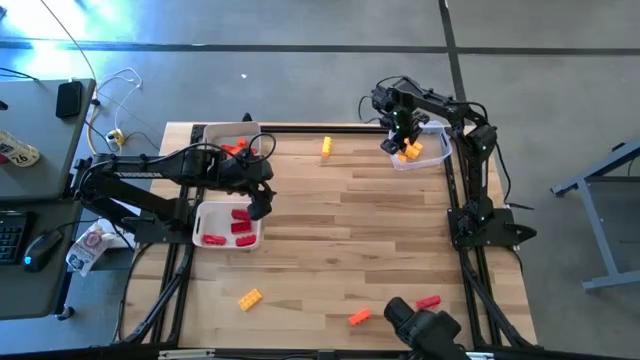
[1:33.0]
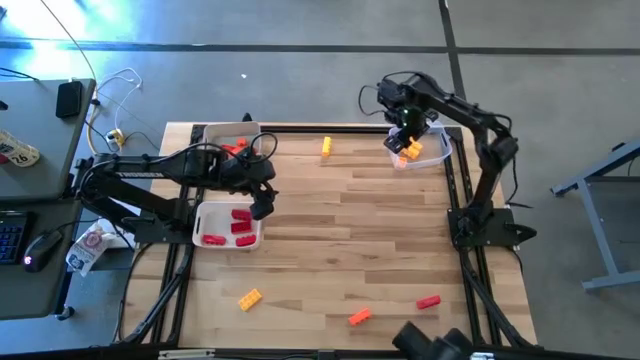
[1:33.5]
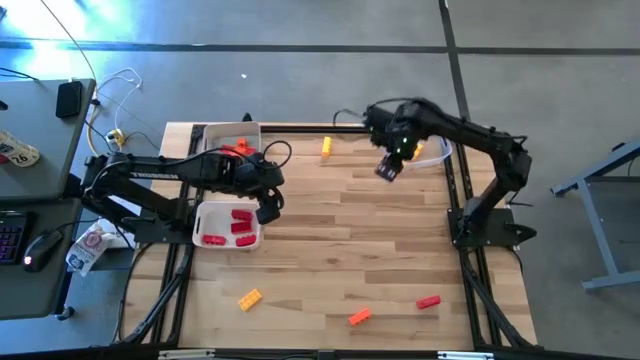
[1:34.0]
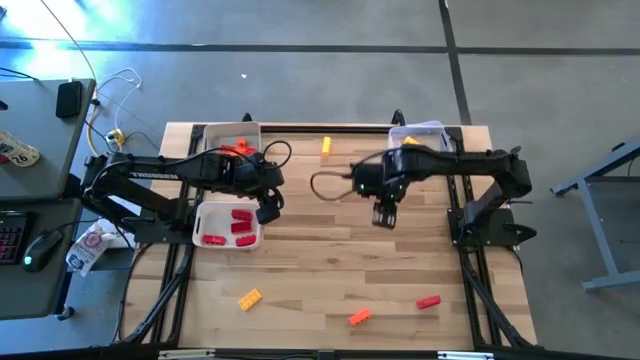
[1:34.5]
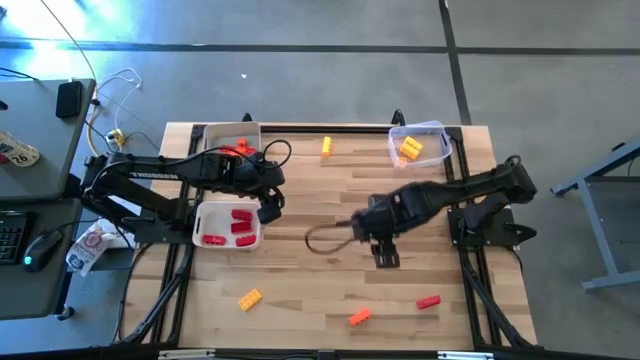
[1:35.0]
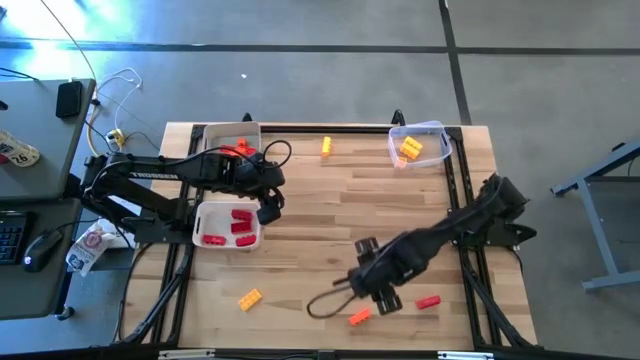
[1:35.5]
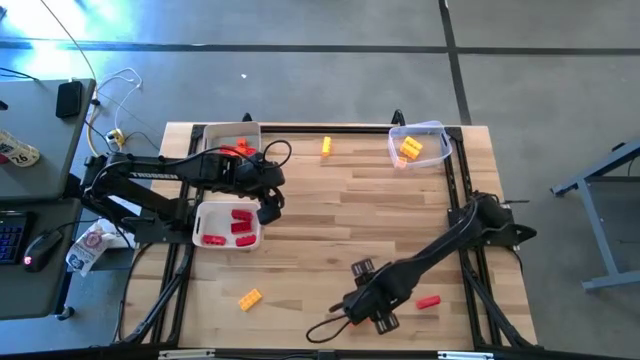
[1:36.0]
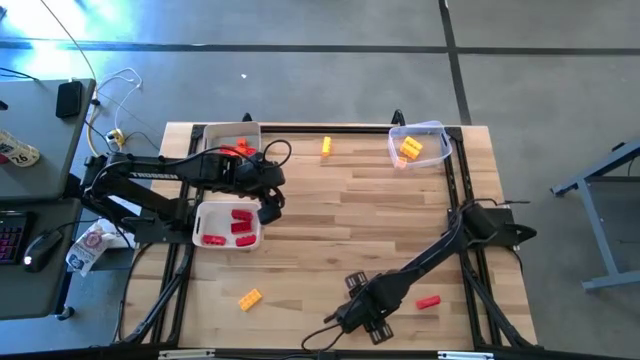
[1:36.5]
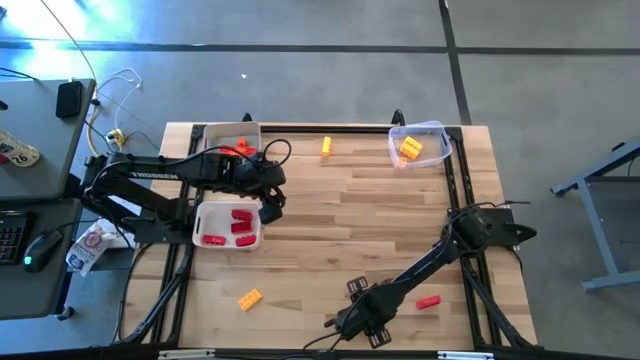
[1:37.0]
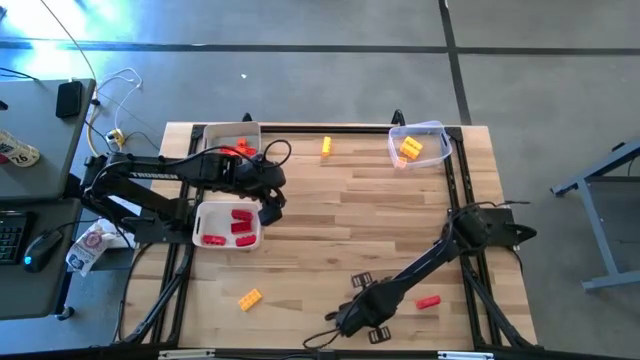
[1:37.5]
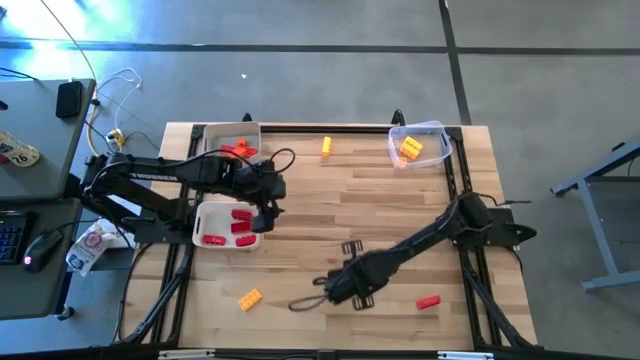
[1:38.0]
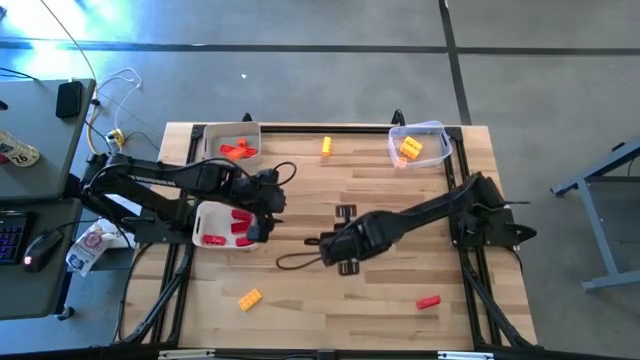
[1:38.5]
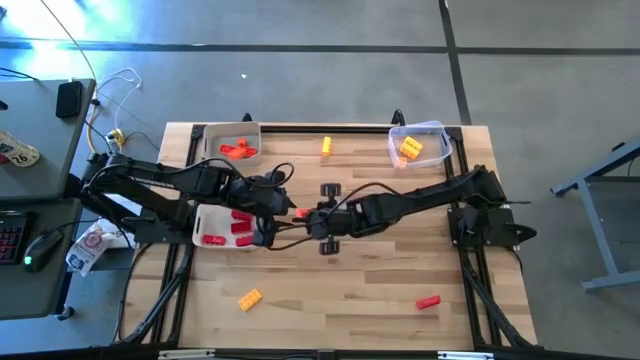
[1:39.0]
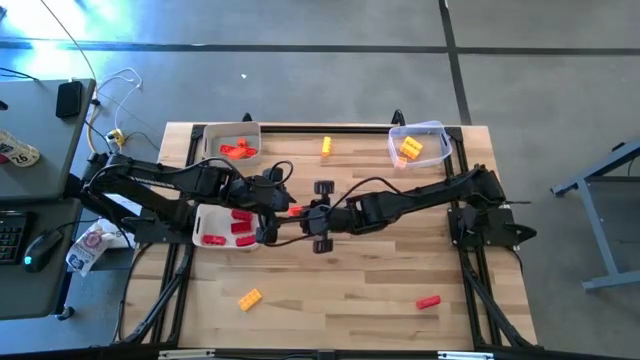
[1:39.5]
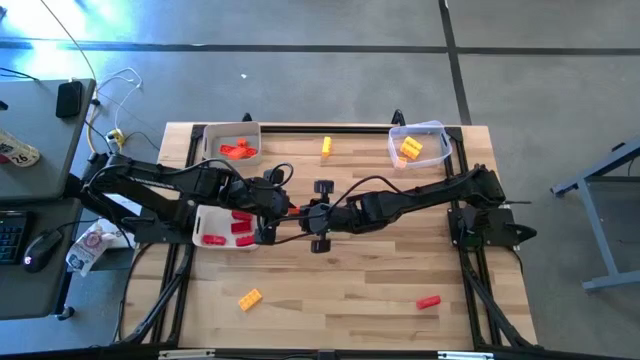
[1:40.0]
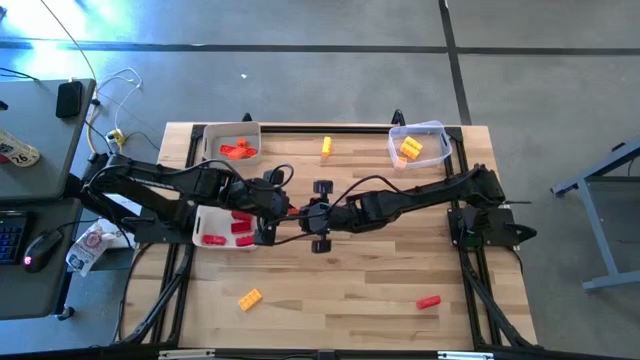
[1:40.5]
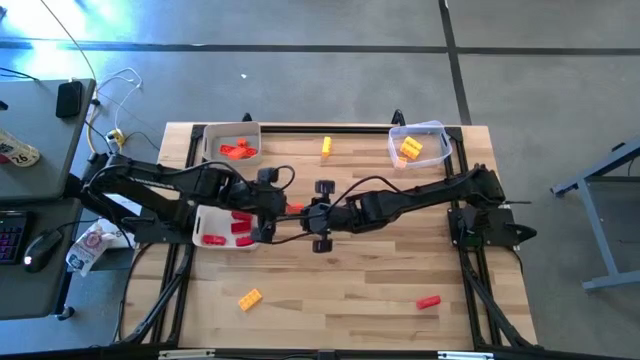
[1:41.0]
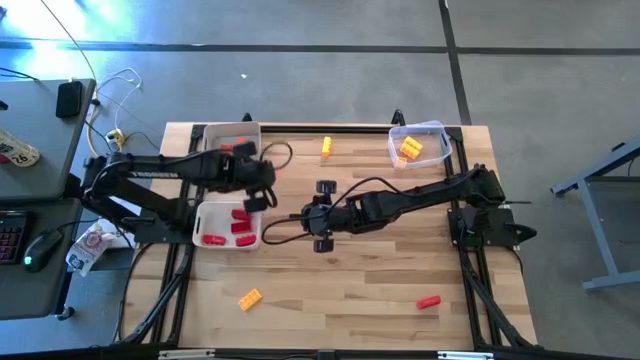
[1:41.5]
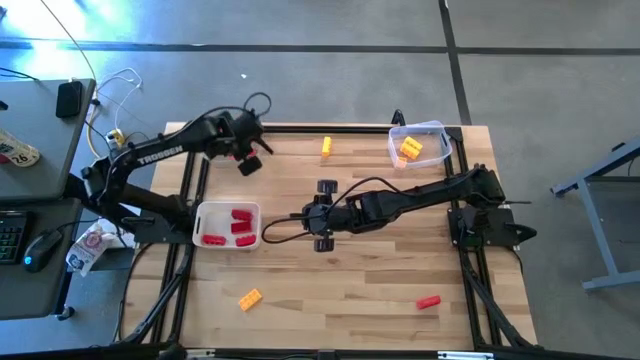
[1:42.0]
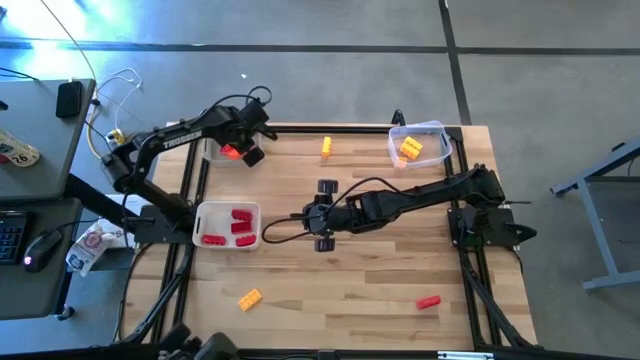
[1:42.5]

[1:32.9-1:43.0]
Task: Sort & place blocks by color
Put the orange game piece into the gray bin

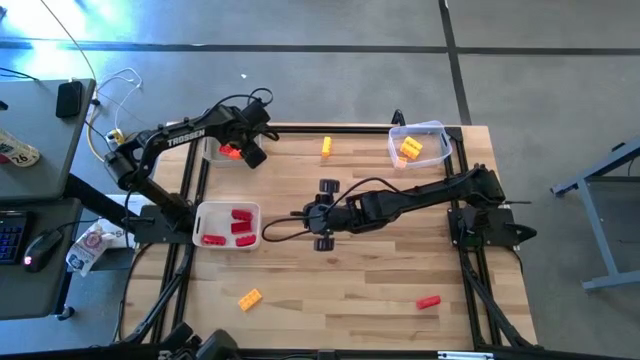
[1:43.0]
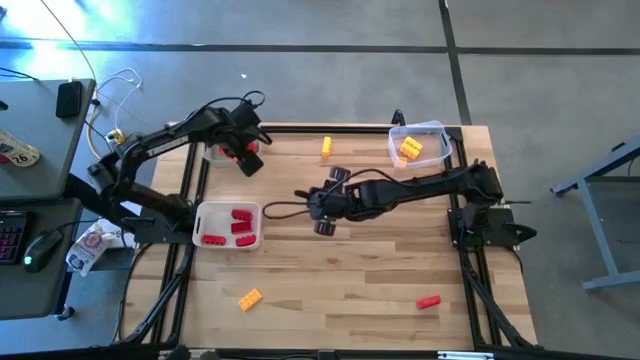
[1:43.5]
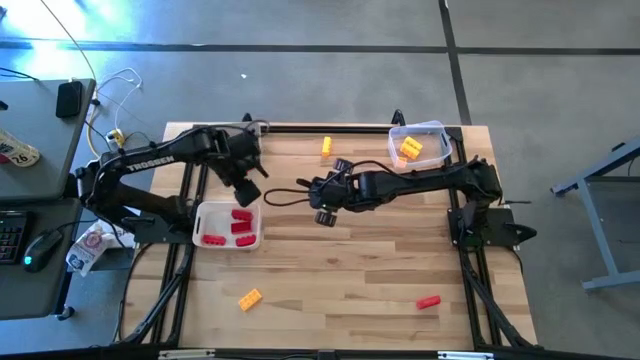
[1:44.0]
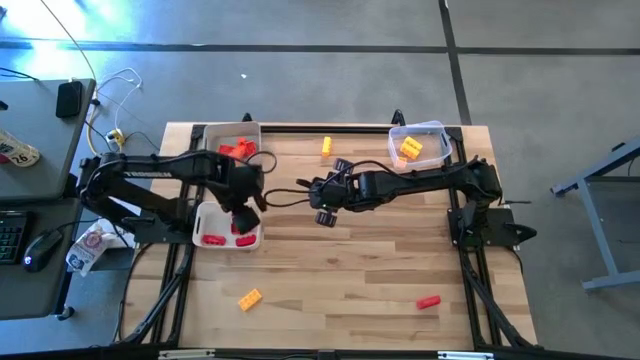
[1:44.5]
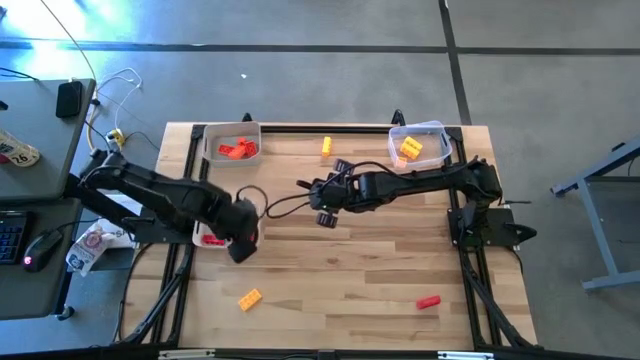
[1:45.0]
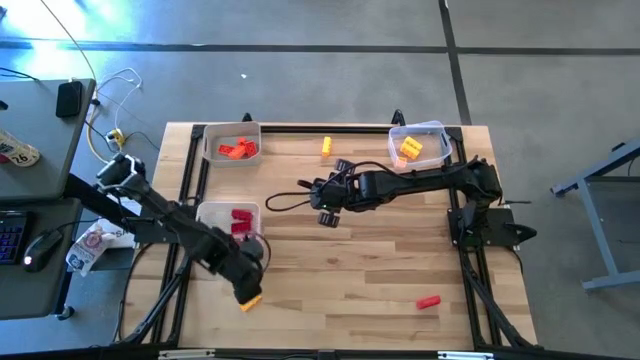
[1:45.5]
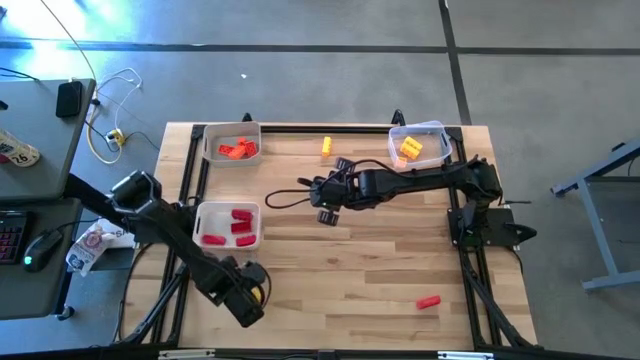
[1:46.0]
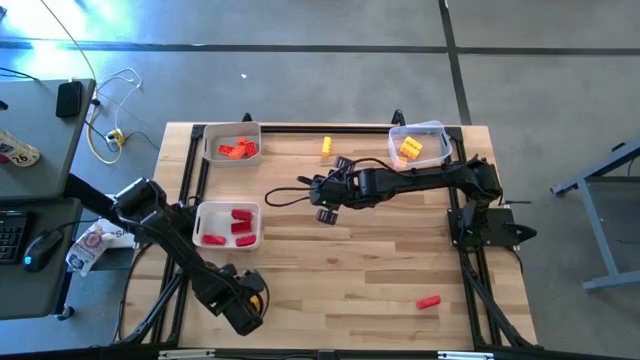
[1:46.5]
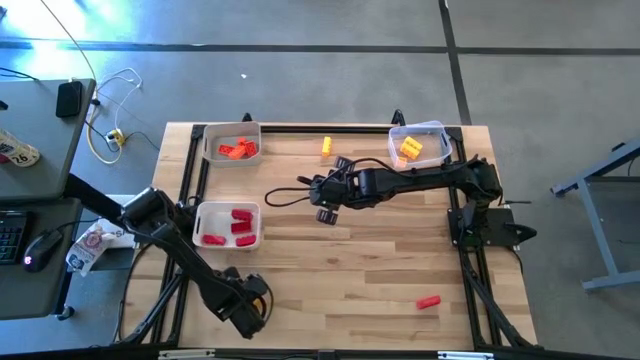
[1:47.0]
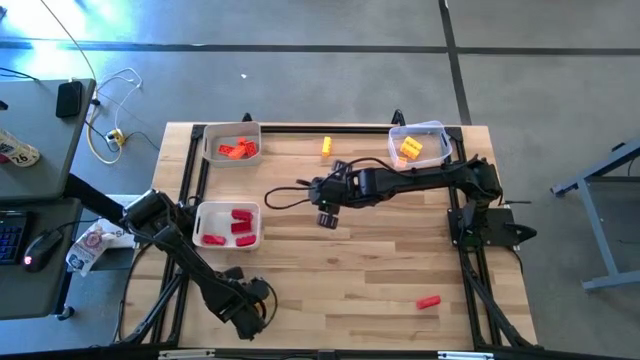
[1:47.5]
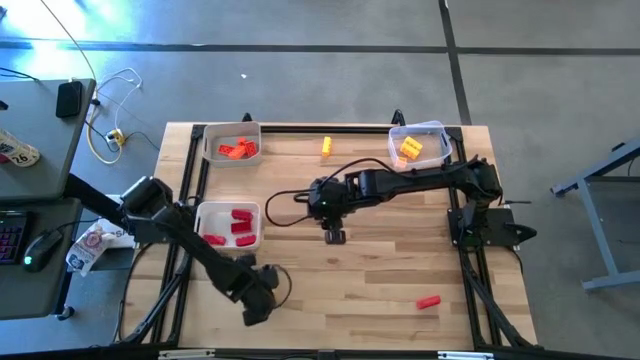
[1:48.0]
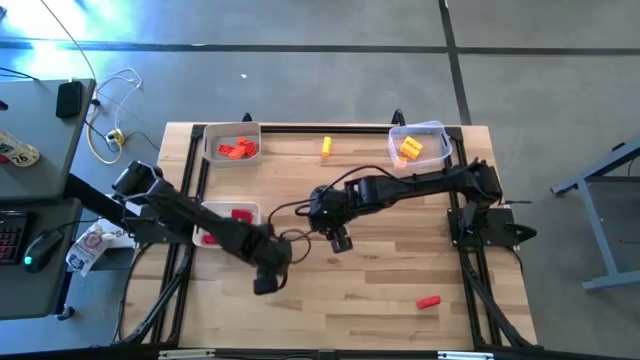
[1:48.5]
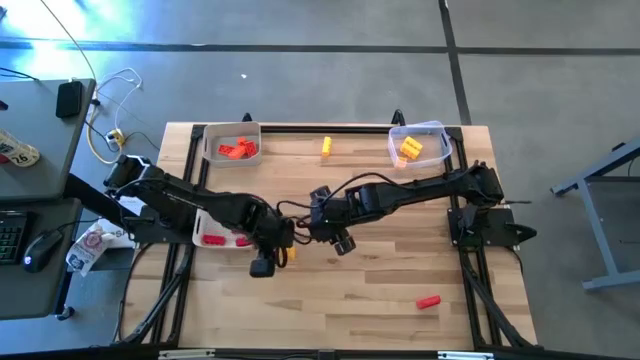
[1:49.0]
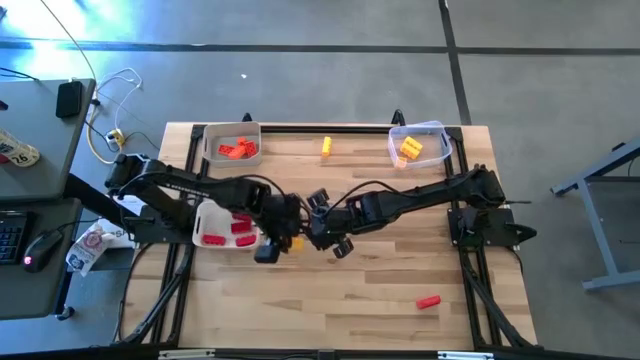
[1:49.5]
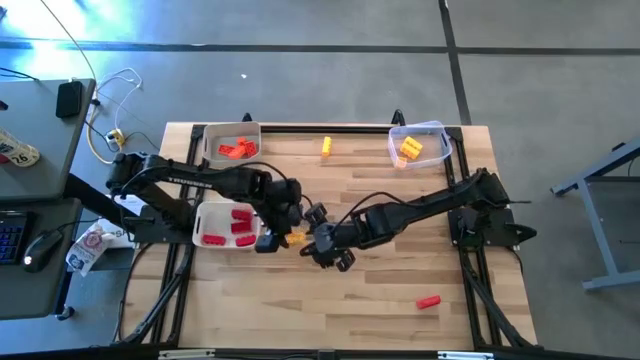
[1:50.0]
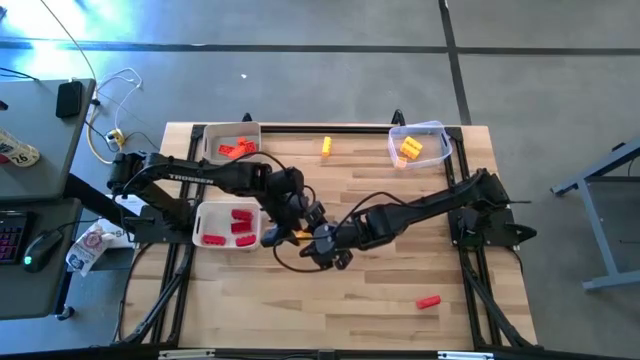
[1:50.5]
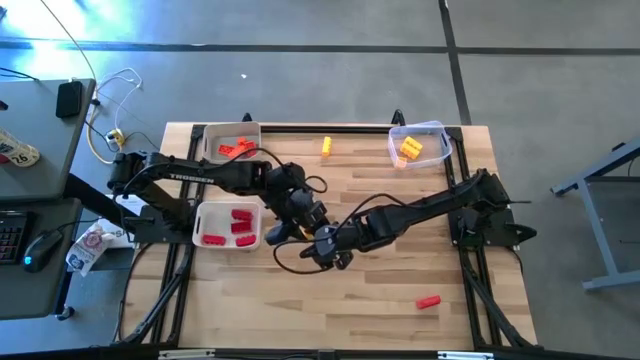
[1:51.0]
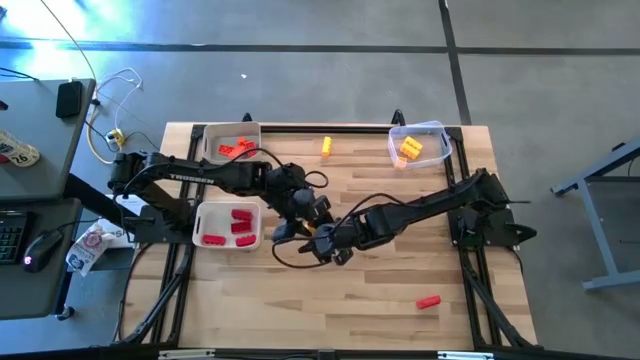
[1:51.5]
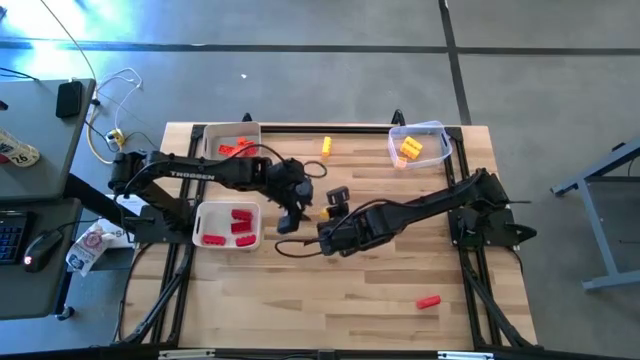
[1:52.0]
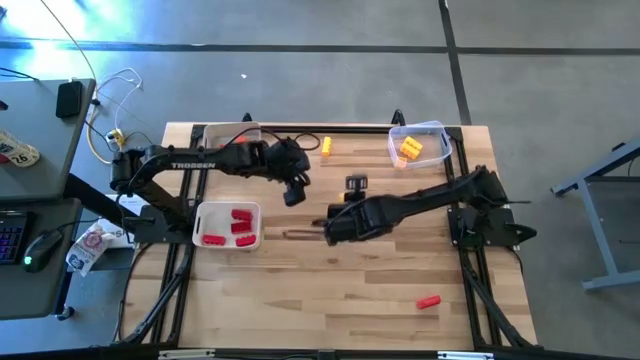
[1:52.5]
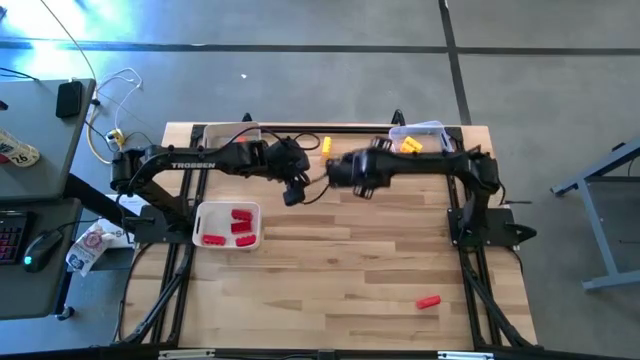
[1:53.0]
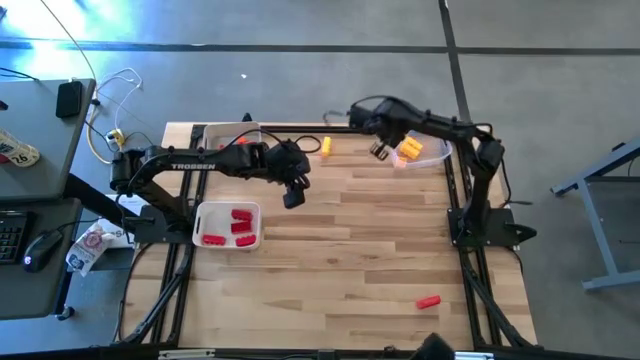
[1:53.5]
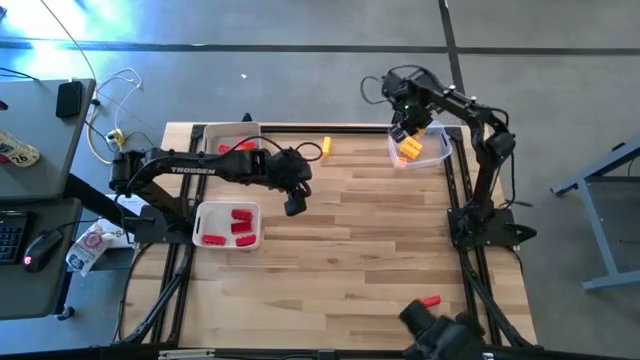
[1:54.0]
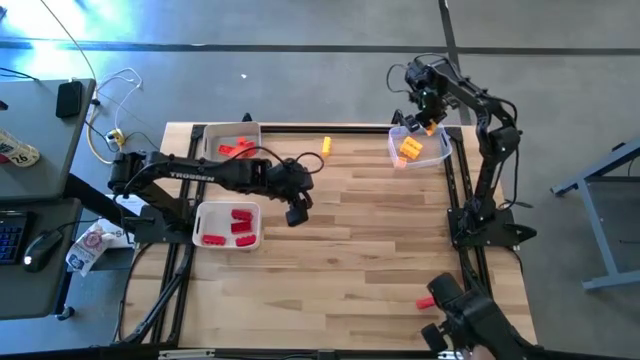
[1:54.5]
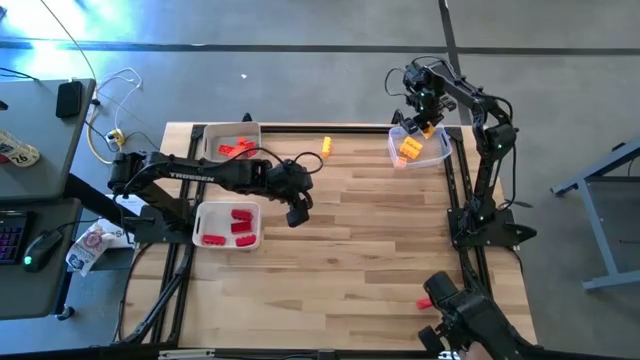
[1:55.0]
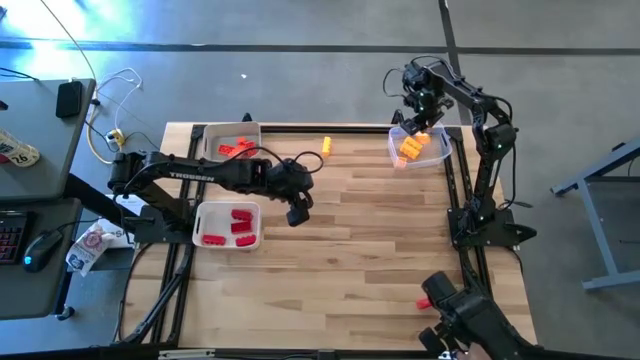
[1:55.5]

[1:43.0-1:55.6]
Put the yellow game piece into the transparent bin
